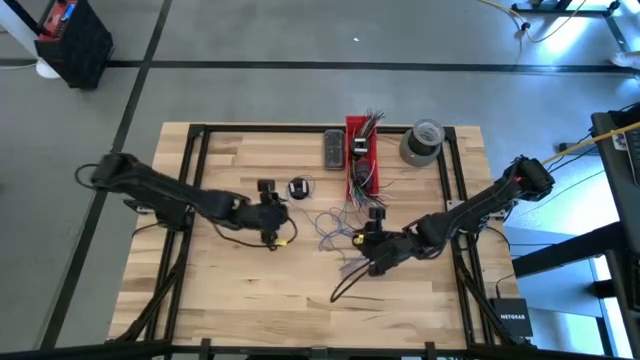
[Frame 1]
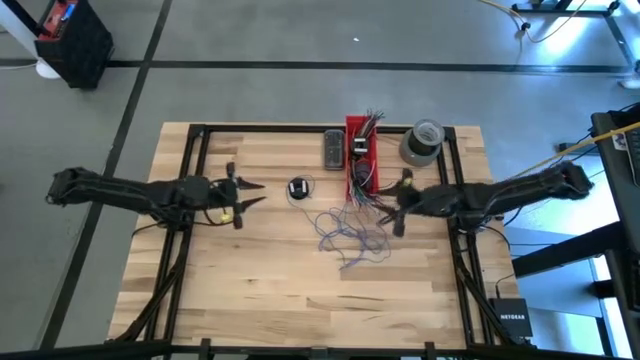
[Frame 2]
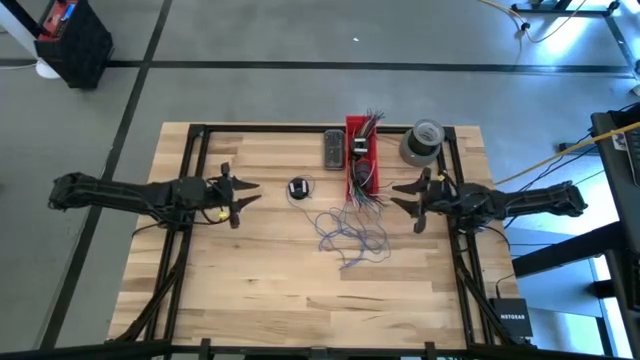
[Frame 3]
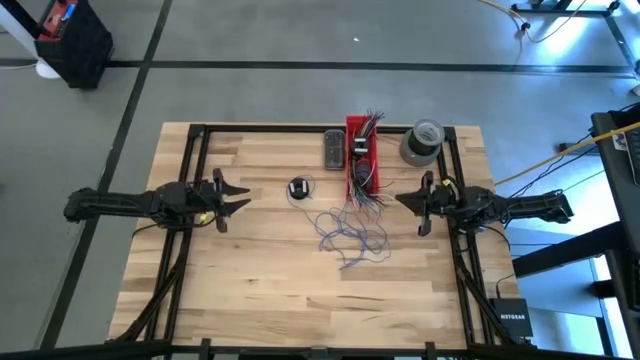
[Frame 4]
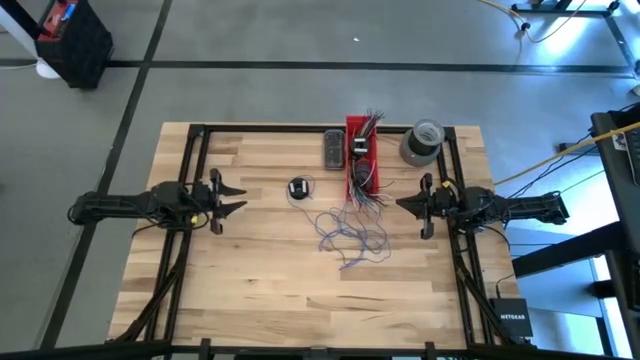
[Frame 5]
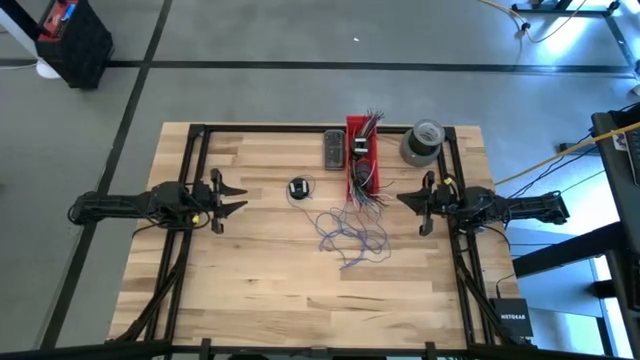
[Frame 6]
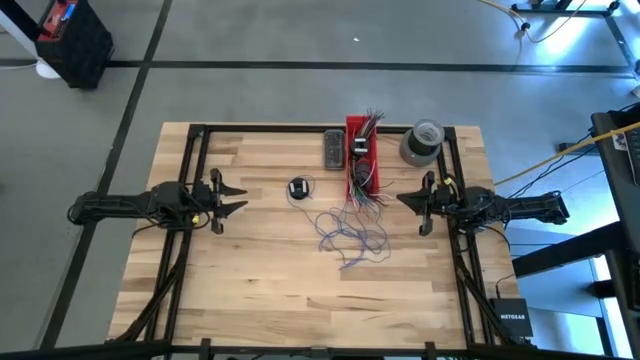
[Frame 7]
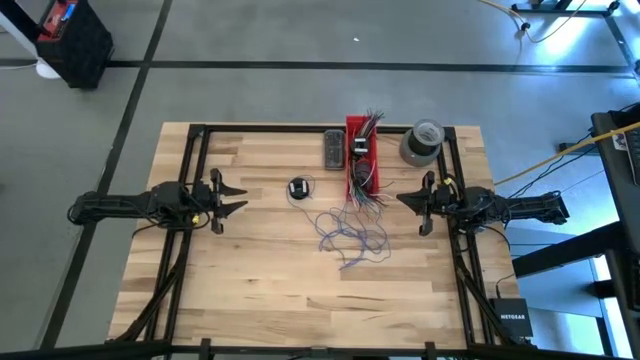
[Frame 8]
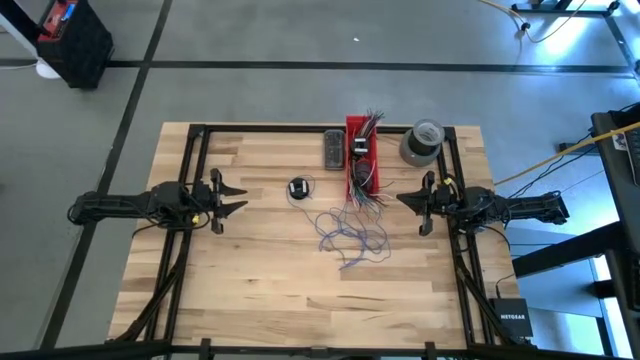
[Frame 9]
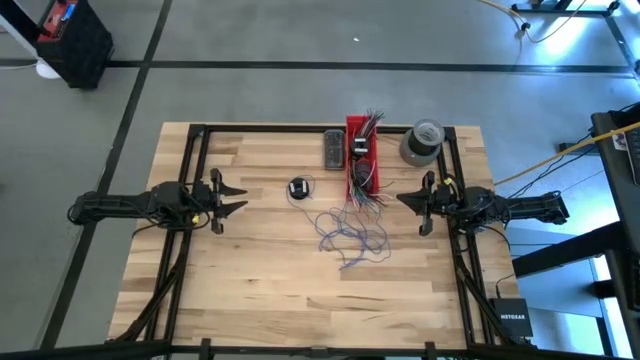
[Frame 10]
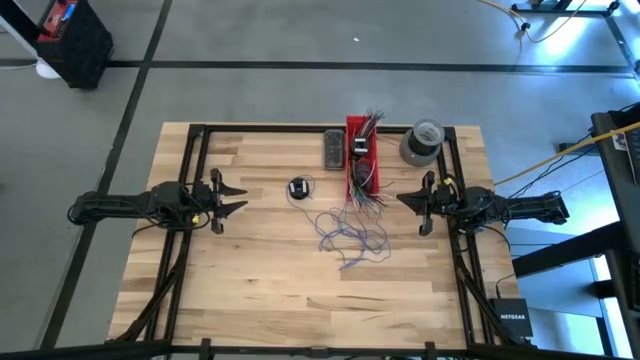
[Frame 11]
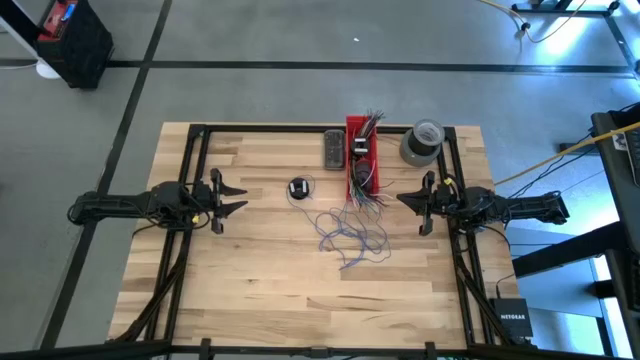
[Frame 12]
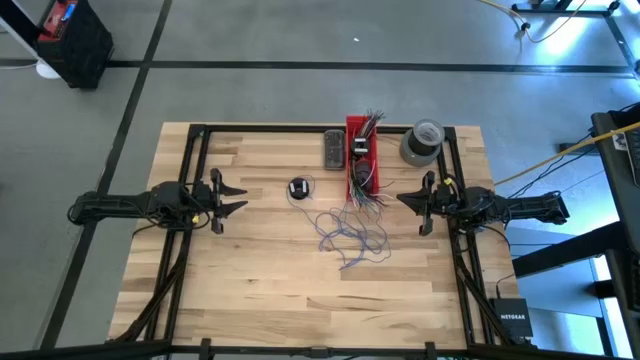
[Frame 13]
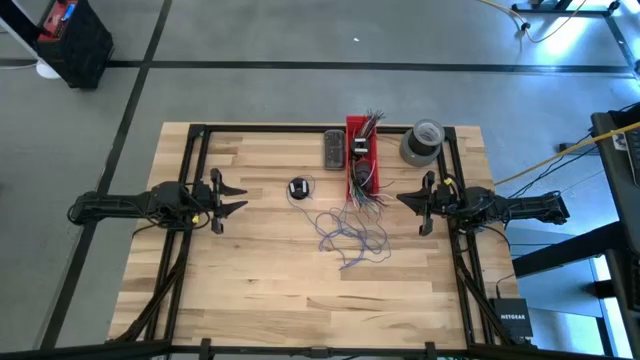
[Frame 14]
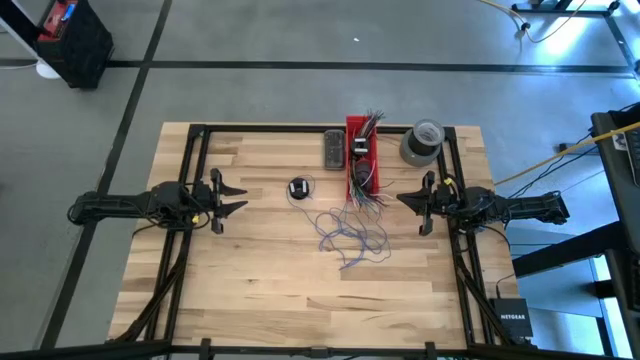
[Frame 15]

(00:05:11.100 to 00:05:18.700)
Task: Coil cords
Return to Home Position

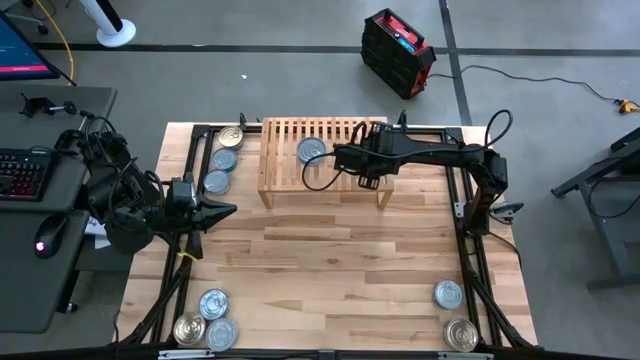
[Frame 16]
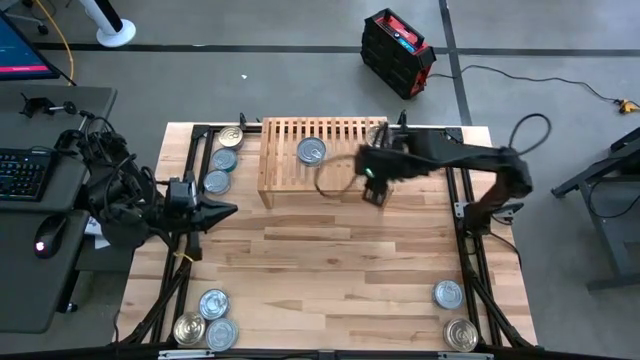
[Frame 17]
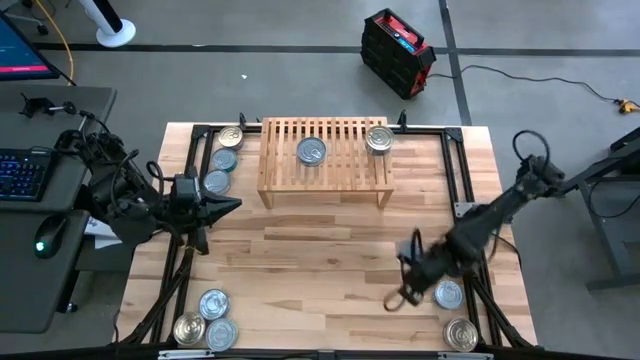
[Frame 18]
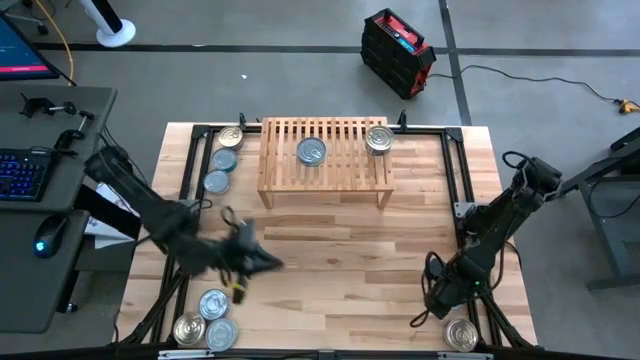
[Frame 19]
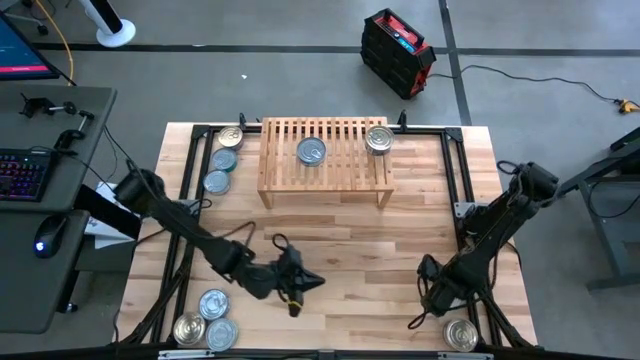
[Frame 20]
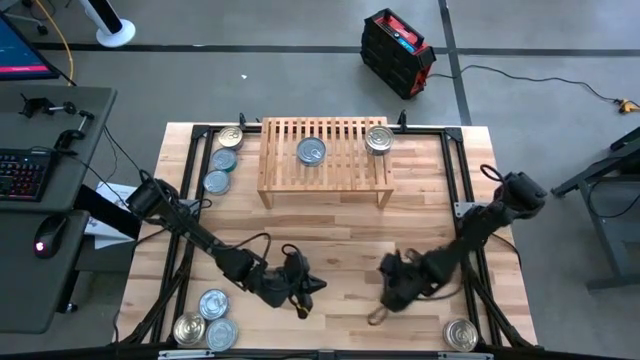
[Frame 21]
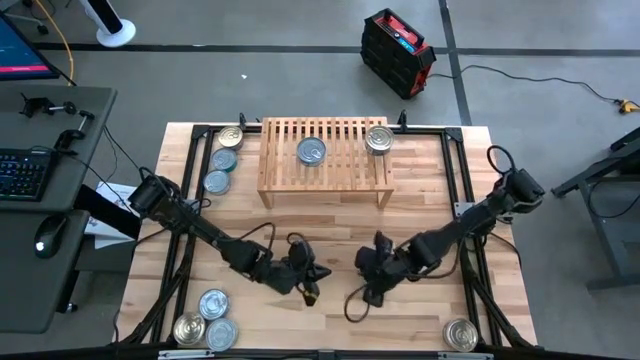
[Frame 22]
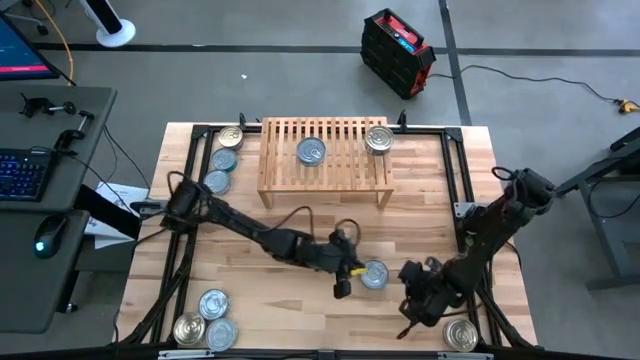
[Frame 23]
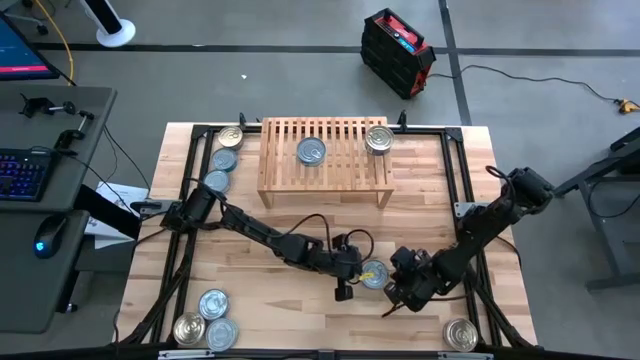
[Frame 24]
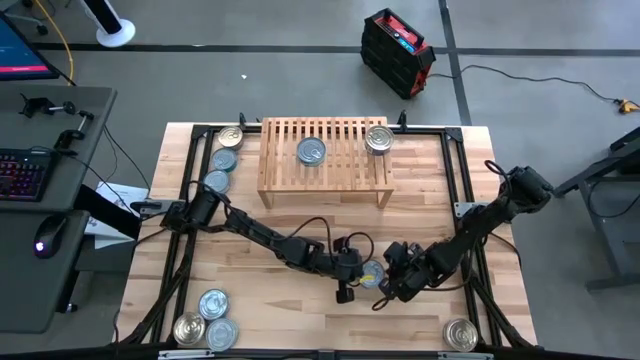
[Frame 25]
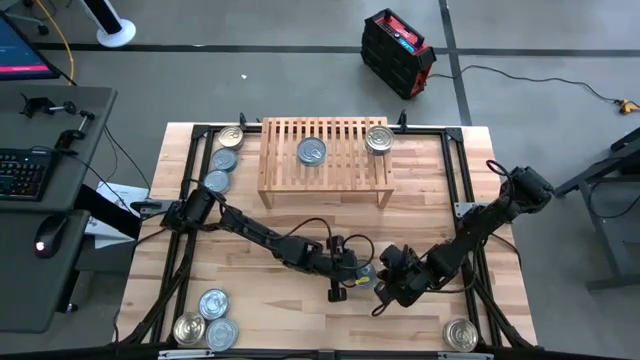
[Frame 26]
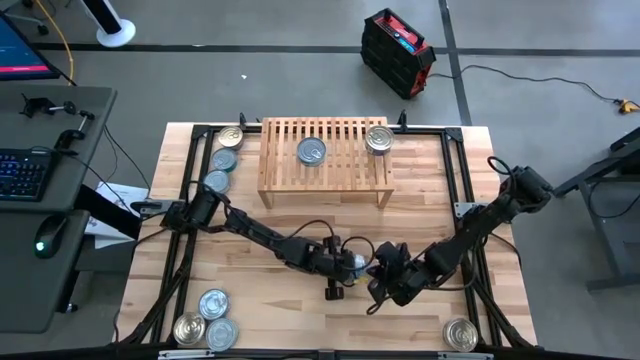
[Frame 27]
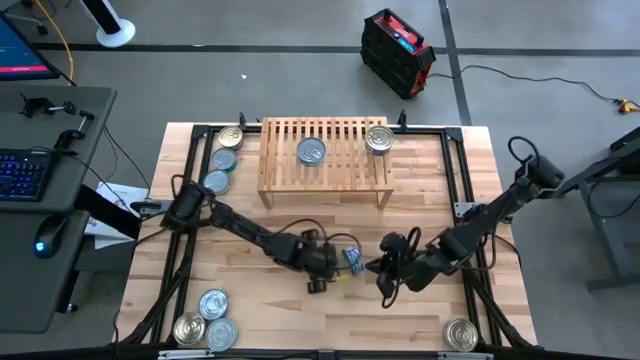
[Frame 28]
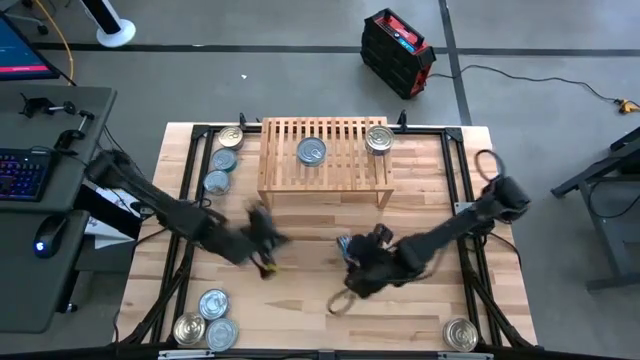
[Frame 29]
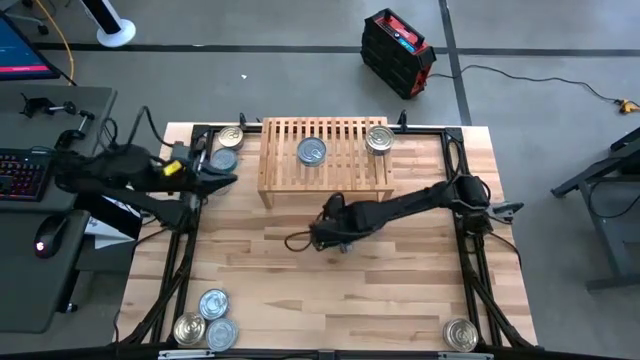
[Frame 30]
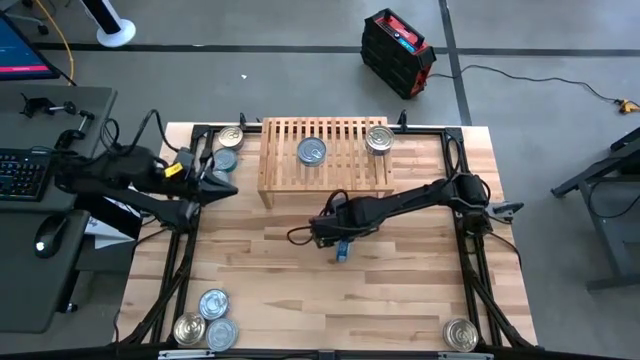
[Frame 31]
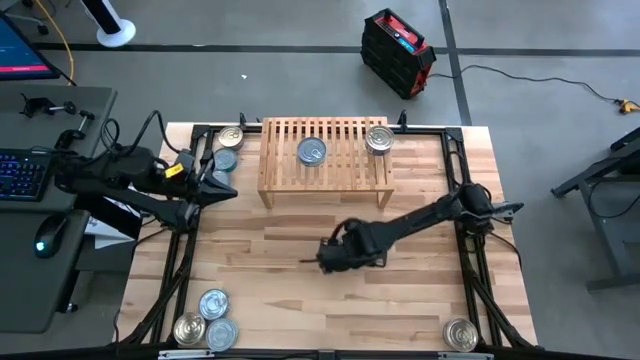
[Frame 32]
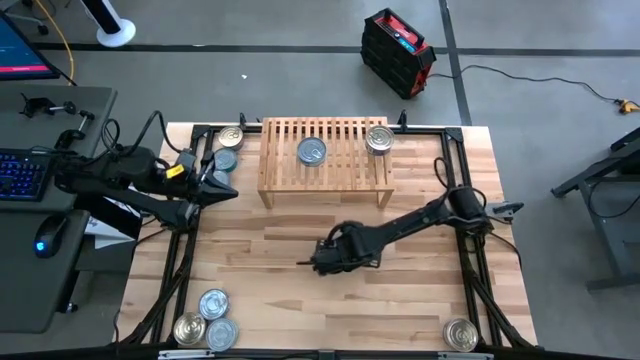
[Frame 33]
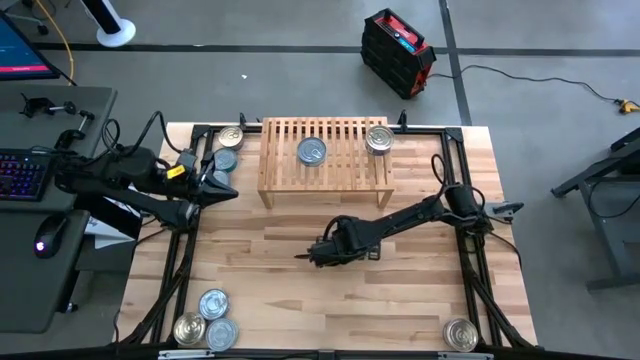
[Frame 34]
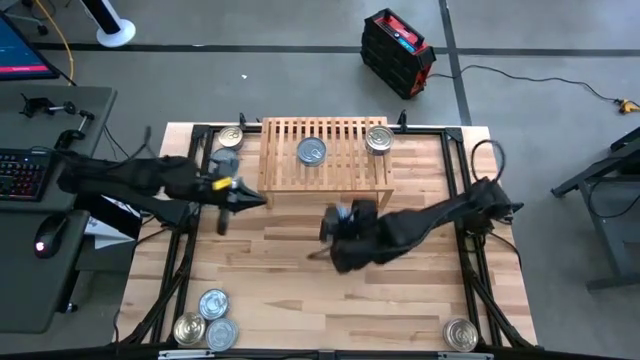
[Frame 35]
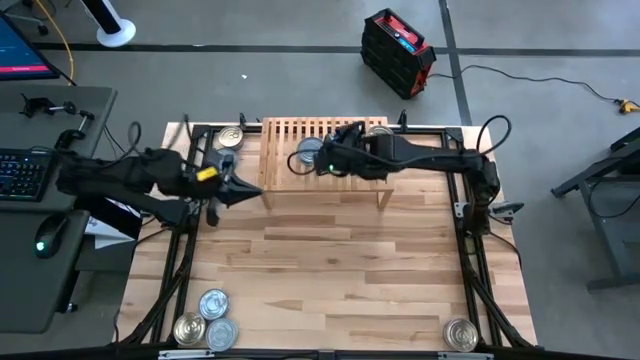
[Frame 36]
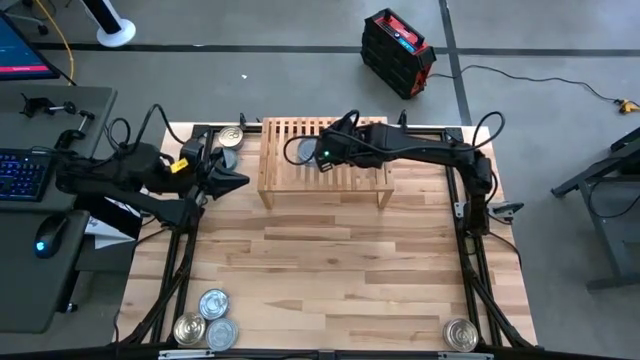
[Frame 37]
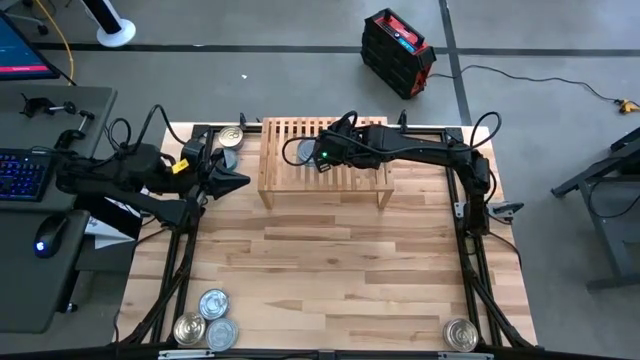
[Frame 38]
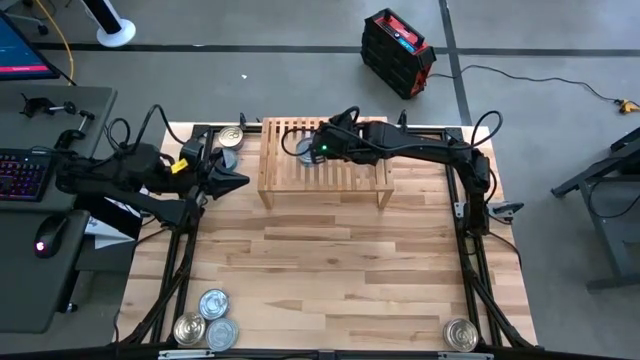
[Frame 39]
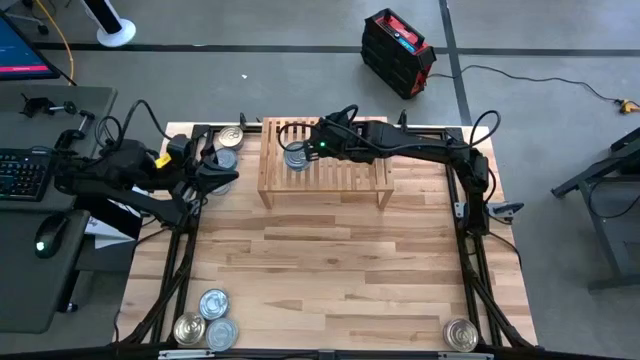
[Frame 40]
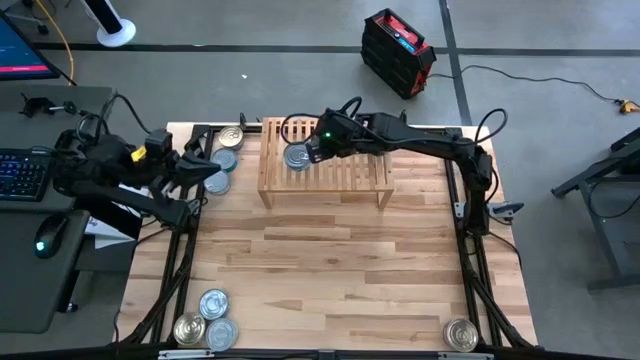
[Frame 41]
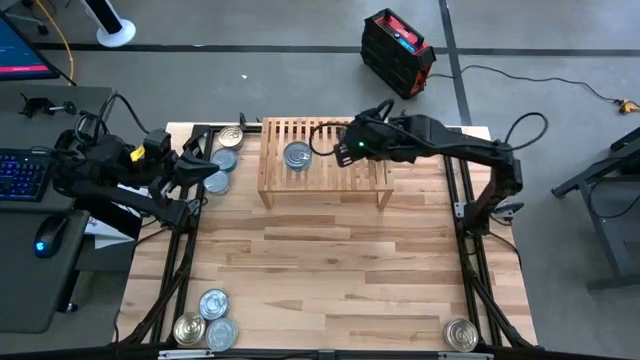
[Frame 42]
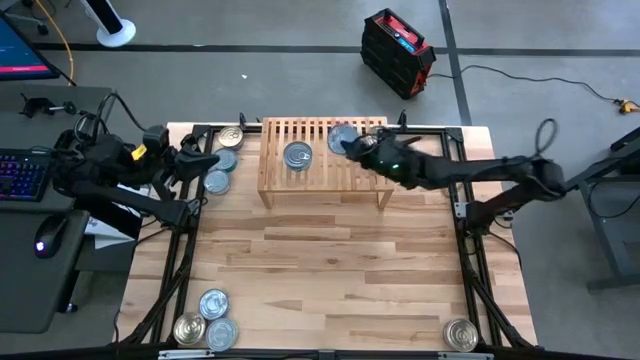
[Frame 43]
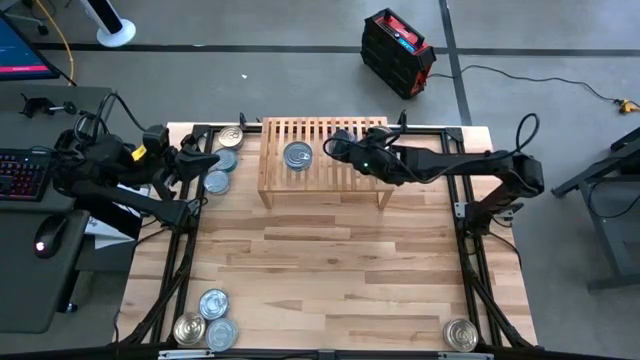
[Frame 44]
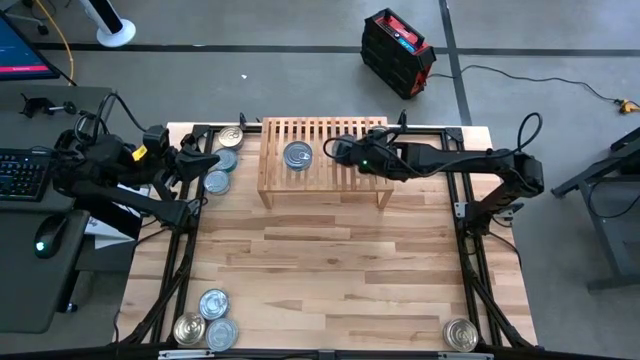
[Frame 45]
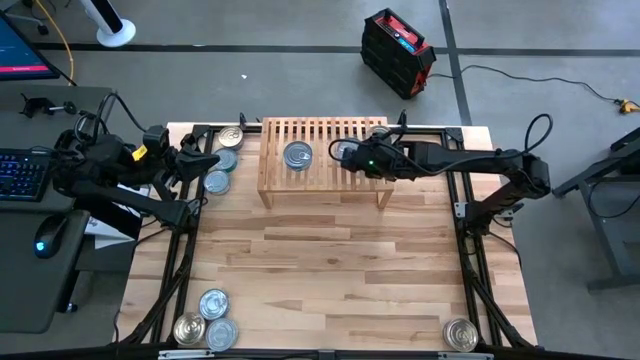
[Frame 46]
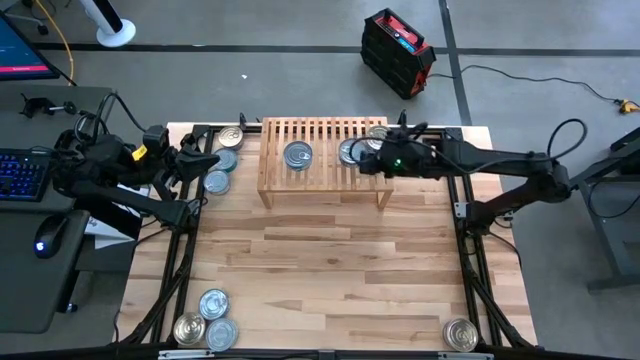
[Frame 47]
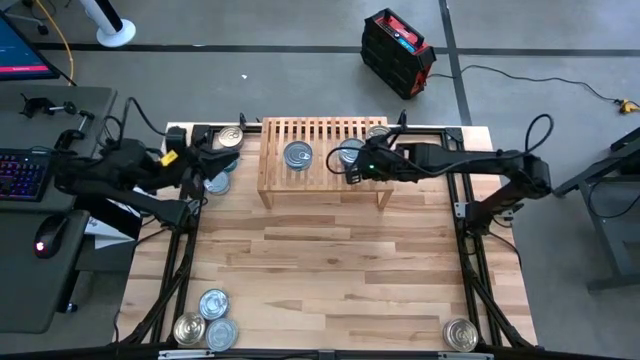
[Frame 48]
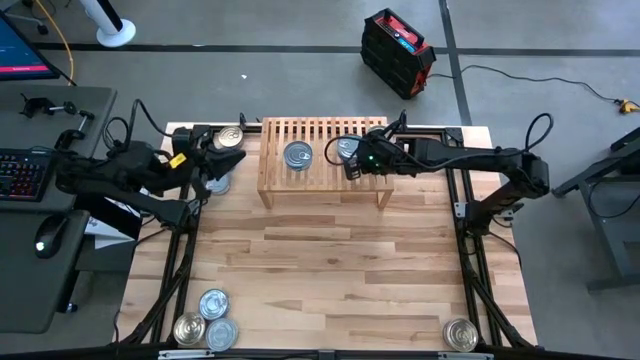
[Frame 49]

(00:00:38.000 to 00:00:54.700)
Task: Stack canned seafood by type on shelf
Put the blue tuna can on the shelf
